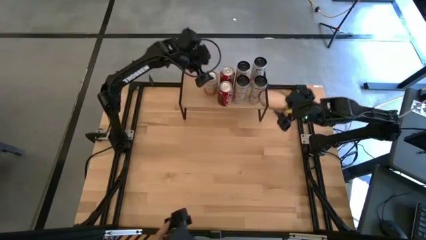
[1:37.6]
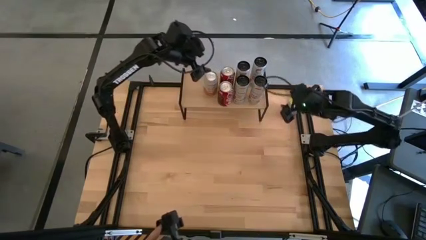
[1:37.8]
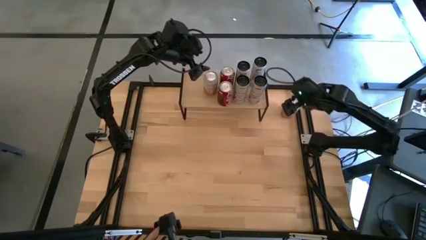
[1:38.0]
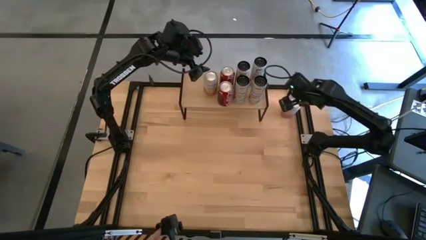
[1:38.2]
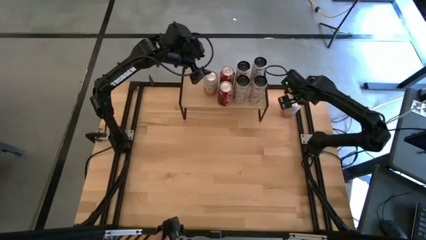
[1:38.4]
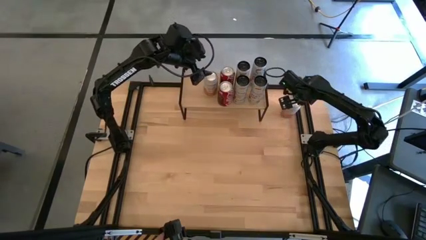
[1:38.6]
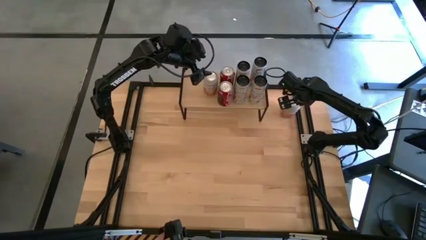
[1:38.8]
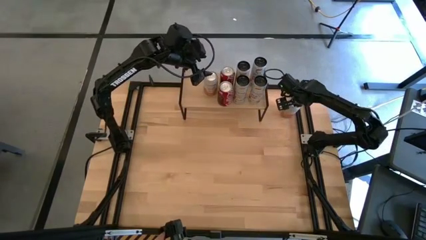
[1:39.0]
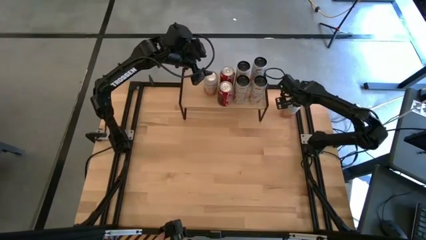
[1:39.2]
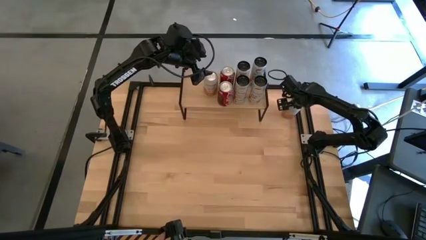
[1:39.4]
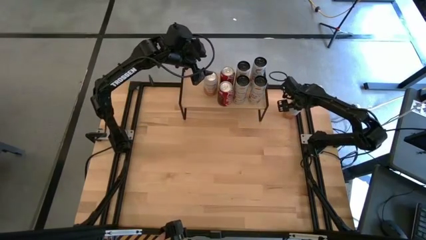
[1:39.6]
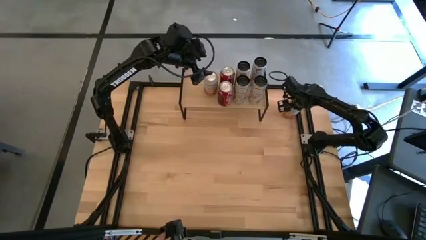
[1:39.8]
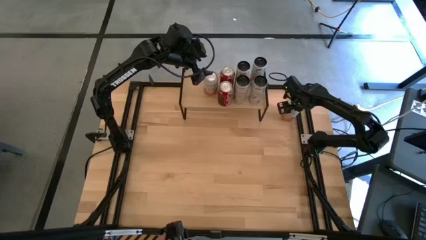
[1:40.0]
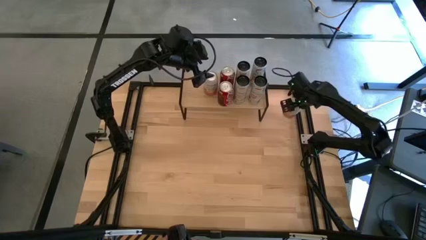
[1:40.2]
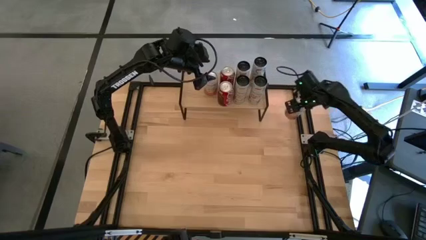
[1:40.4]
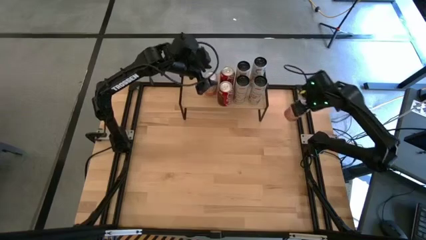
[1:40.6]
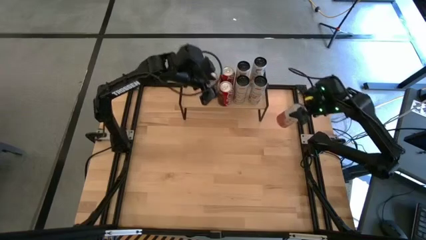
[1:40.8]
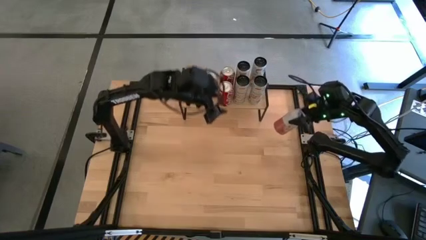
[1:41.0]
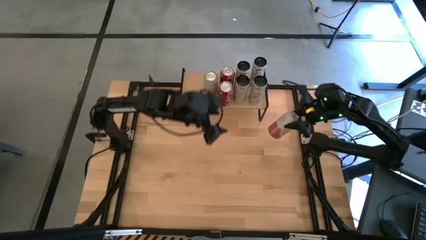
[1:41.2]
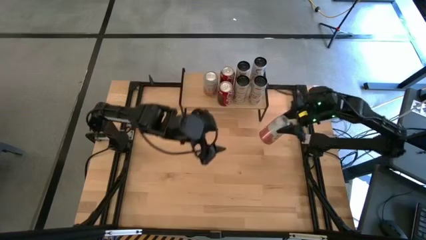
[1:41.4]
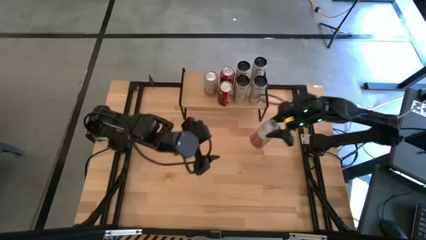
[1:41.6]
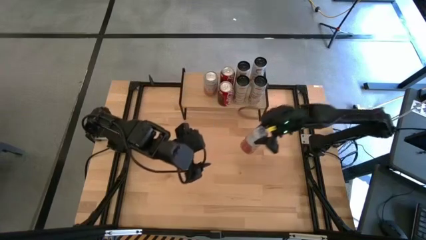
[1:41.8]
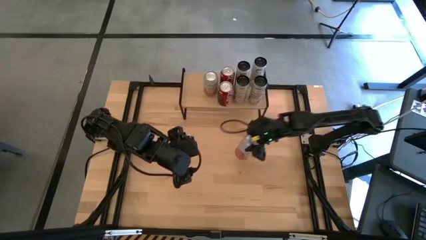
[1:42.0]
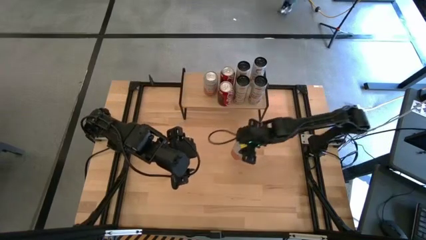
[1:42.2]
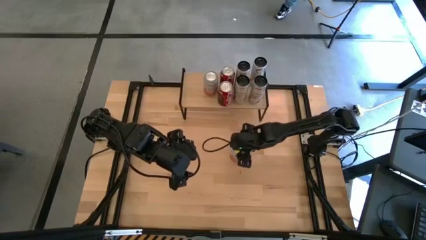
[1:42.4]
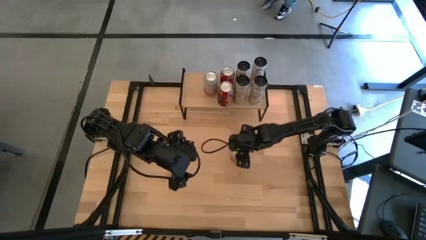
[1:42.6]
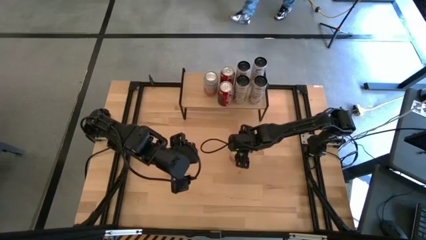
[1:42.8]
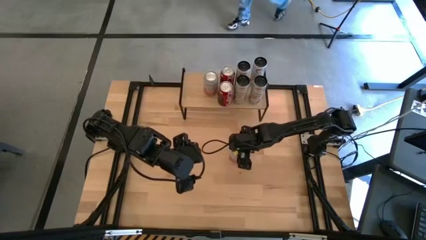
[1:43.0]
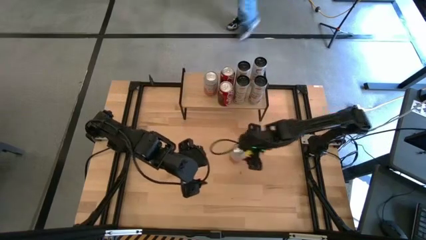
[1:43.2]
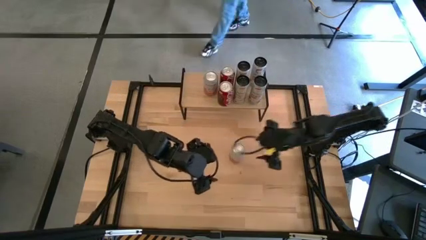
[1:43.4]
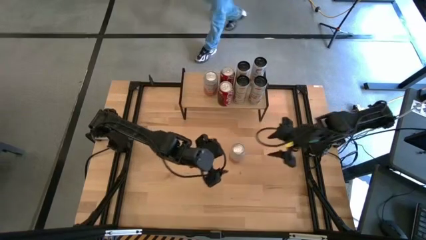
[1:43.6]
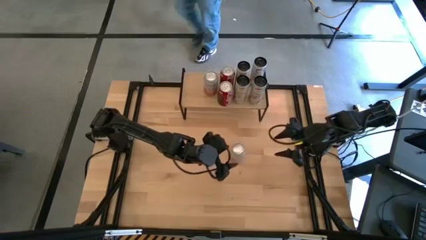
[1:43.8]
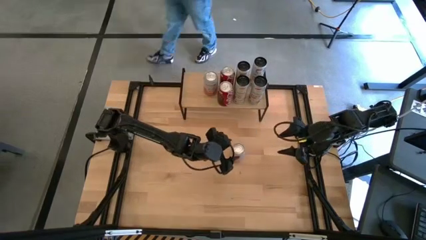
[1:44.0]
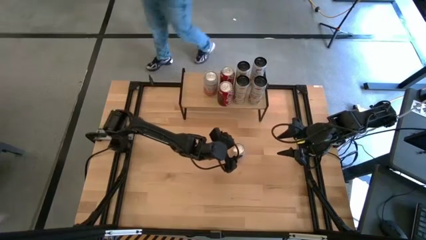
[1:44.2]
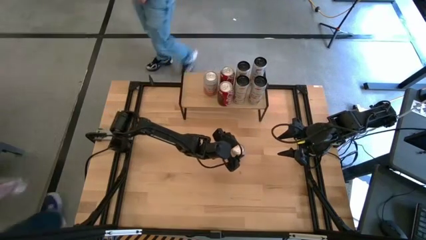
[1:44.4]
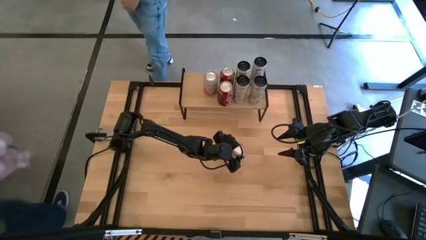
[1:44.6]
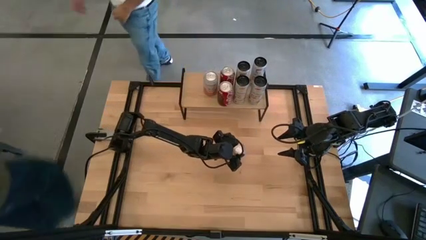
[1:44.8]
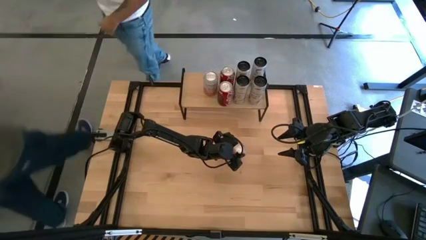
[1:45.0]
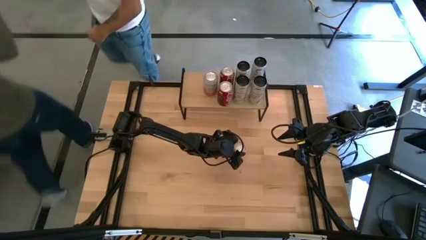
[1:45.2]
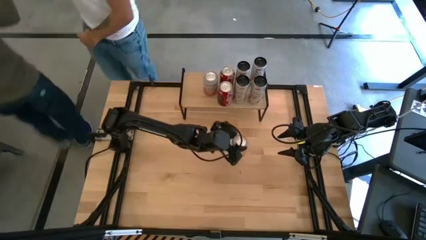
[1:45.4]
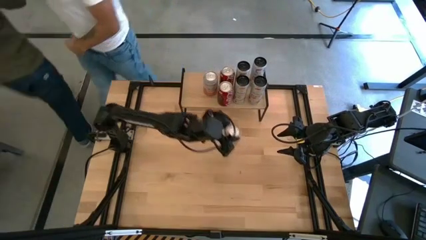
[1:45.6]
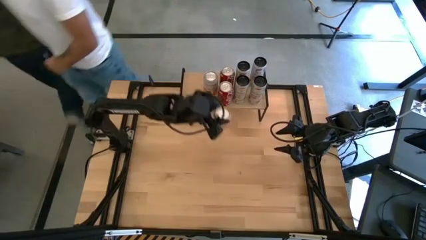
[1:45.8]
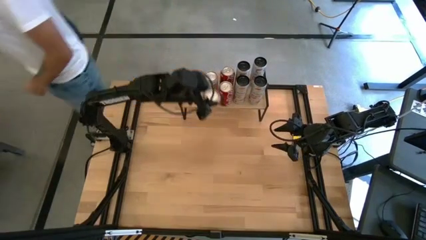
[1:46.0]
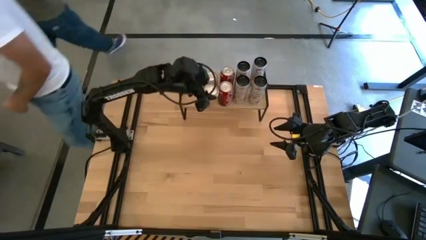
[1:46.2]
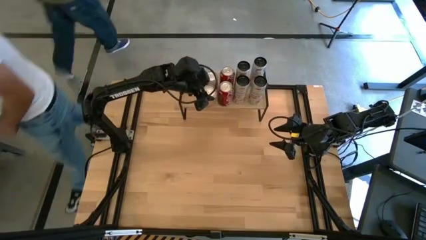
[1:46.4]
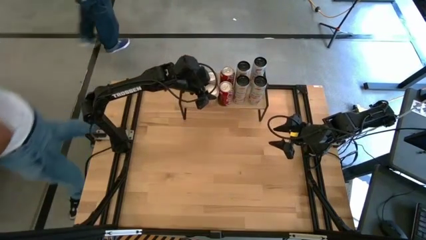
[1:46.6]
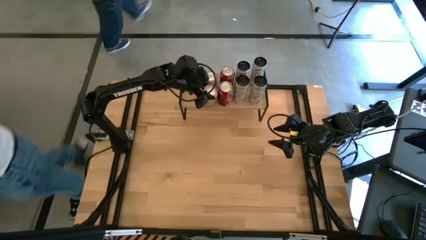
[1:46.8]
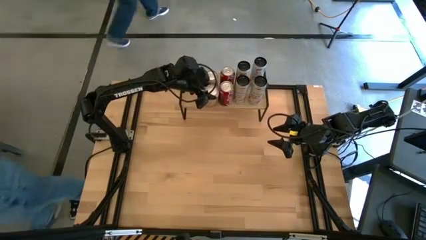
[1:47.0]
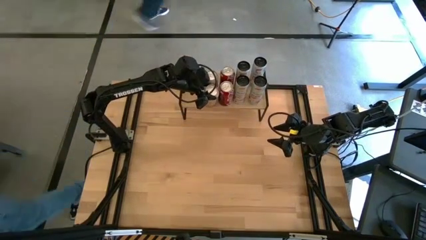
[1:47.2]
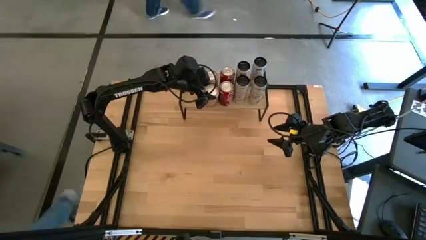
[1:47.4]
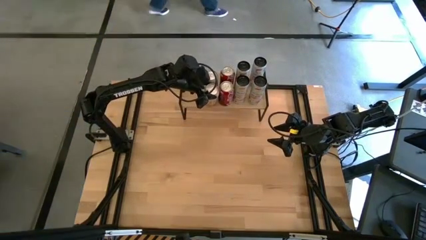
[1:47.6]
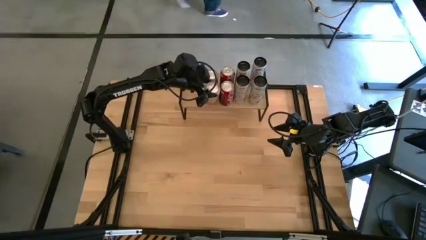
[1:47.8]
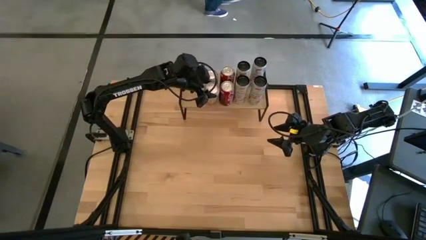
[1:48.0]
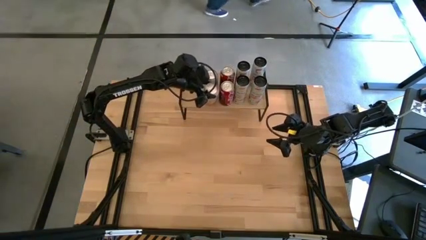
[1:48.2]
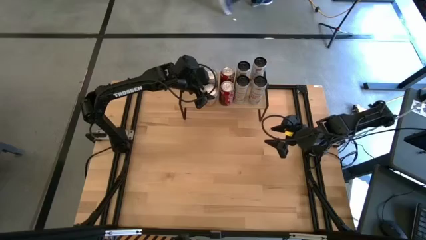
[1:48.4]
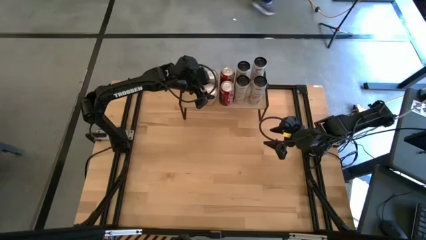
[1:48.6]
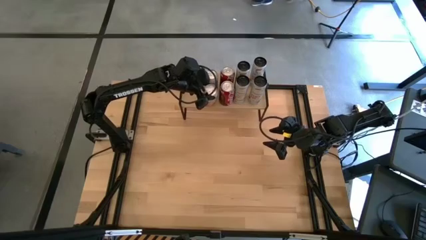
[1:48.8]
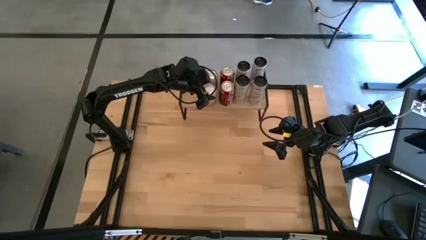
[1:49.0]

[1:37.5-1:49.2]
Task: Place canned beverage on shelf
Put the yellow-white soda can on the shelf aligned with the other yellow-white soda can

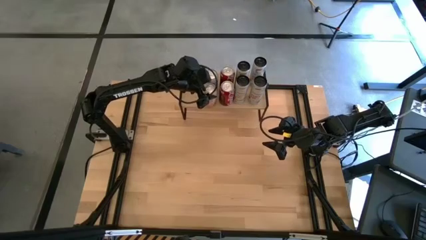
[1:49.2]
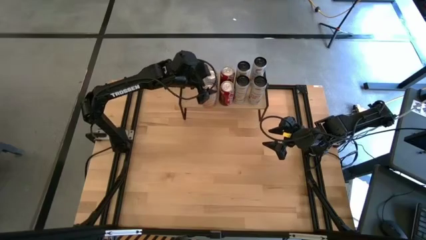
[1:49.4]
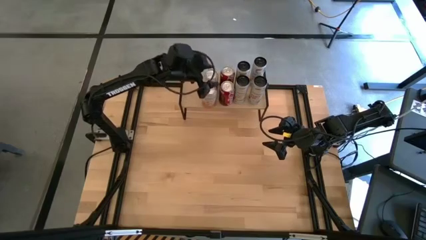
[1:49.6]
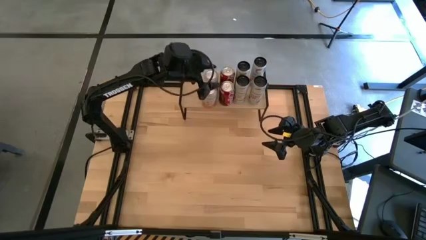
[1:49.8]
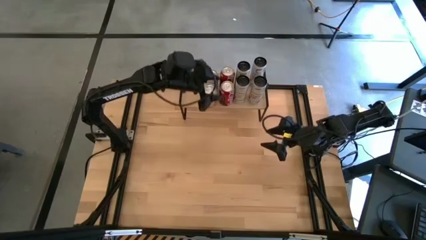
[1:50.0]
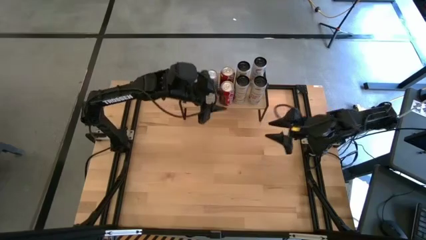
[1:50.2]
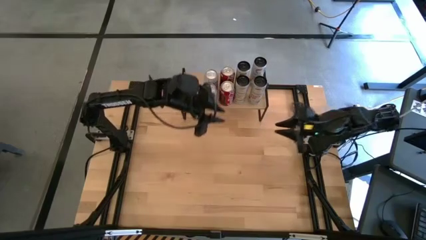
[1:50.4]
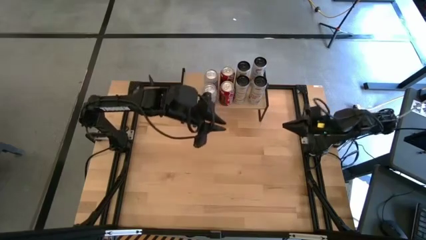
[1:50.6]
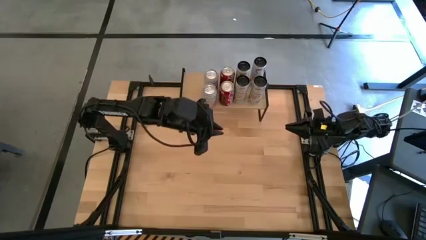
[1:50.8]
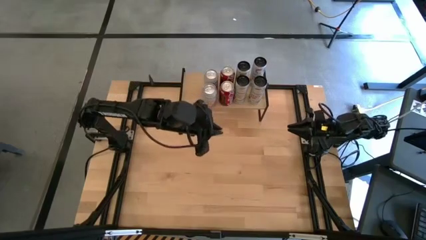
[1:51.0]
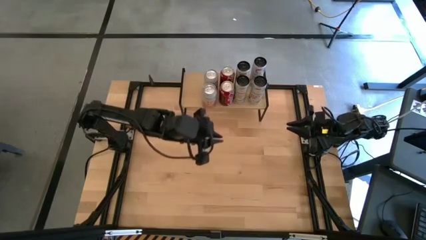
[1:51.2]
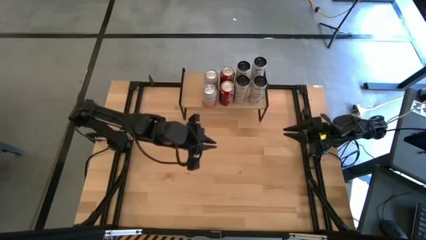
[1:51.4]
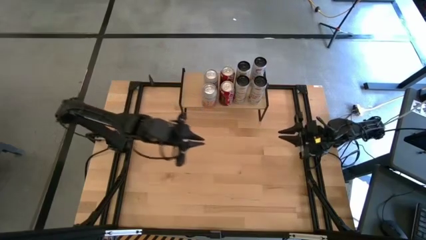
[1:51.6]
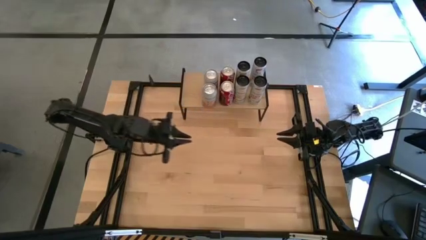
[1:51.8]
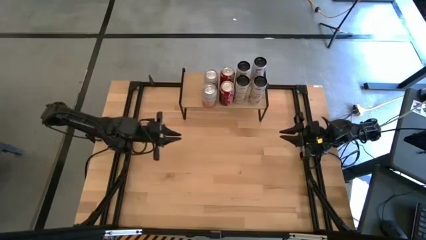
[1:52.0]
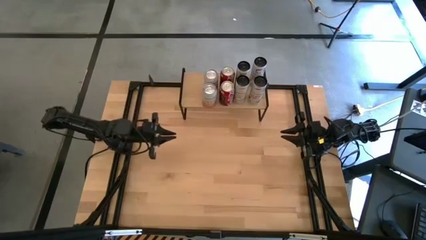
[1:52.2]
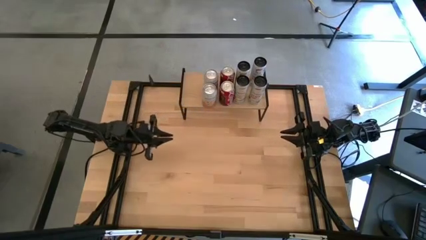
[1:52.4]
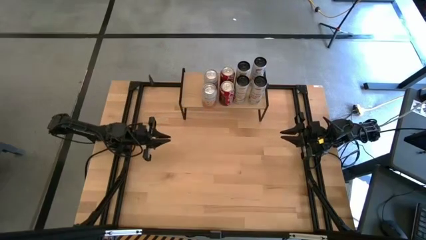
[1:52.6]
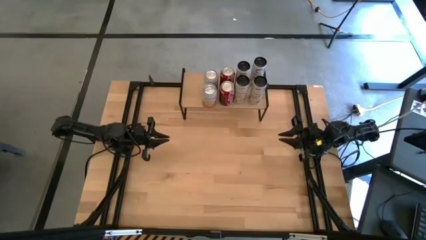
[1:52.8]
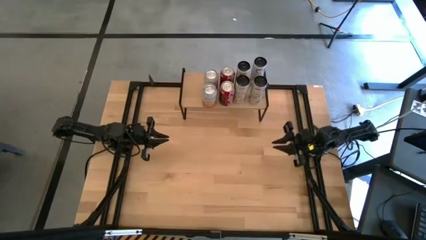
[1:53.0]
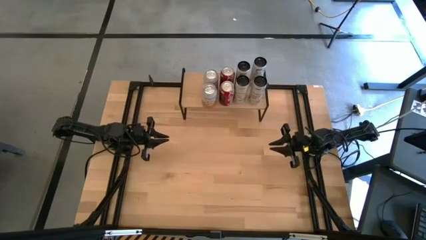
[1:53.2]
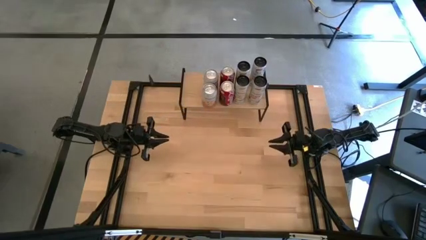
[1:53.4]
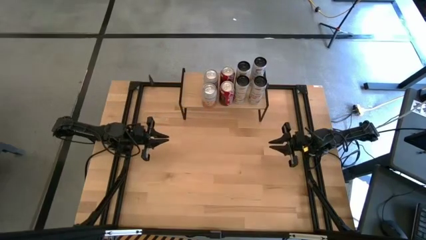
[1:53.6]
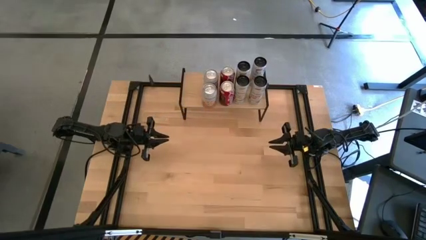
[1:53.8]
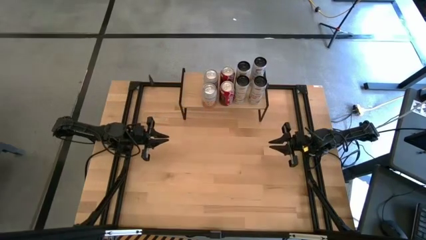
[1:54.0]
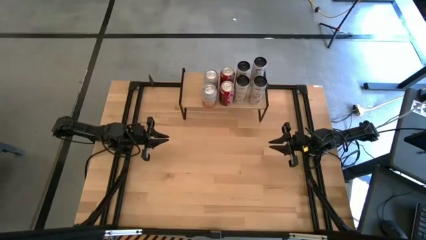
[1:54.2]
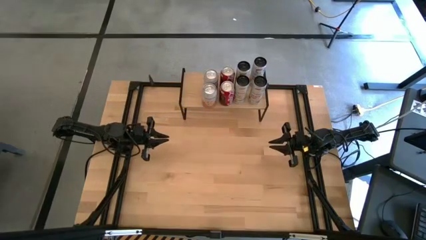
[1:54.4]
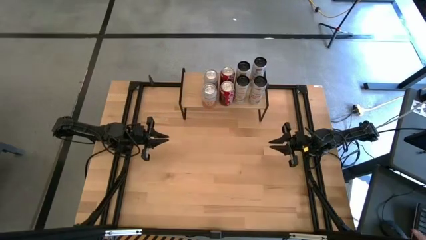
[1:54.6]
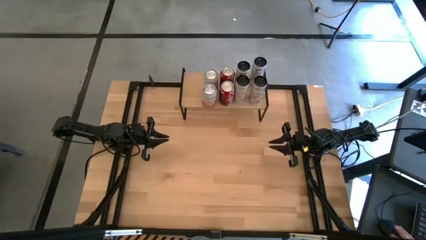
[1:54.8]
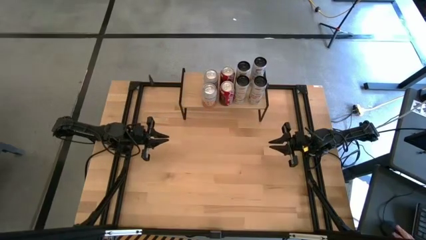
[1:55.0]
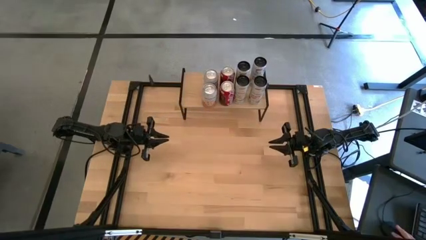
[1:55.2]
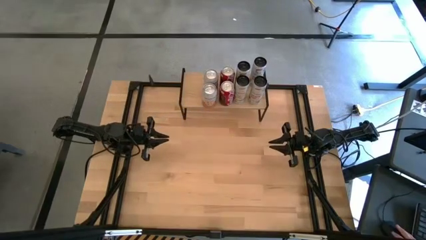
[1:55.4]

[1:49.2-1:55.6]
Return to Home Position
